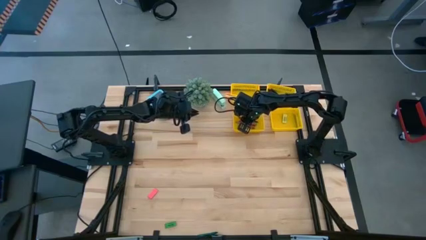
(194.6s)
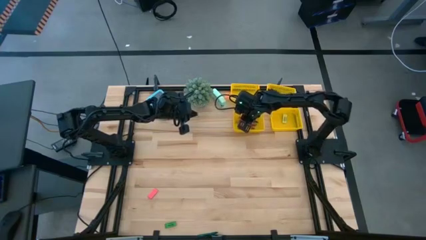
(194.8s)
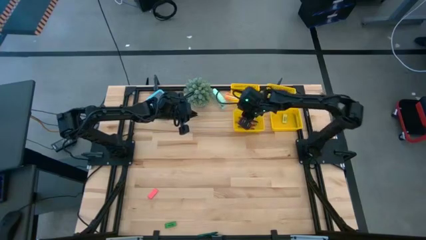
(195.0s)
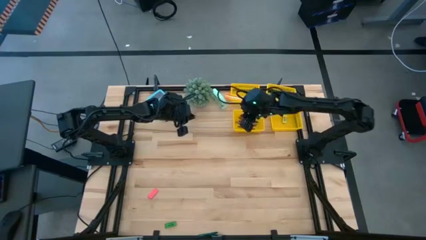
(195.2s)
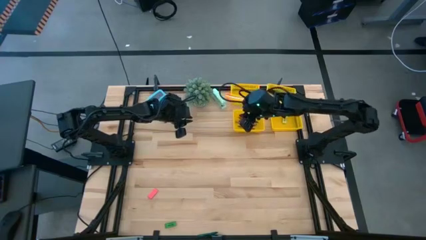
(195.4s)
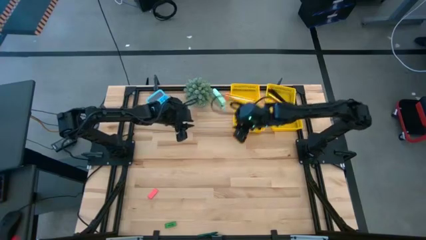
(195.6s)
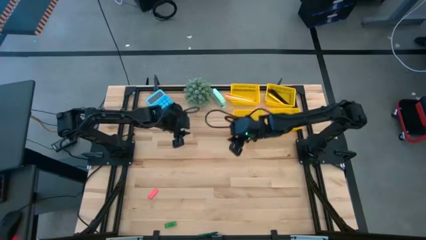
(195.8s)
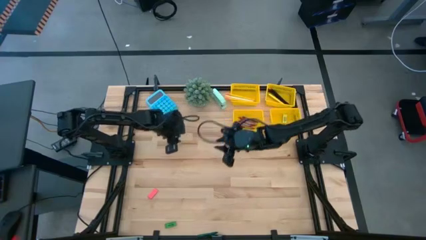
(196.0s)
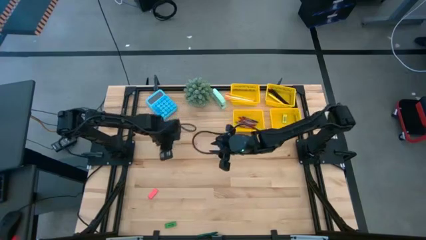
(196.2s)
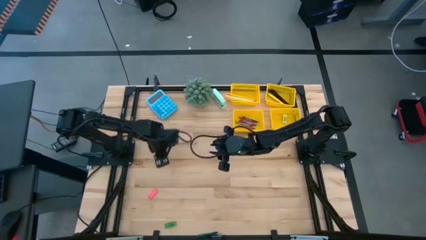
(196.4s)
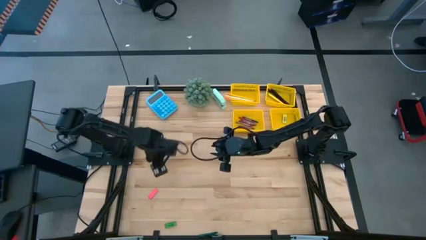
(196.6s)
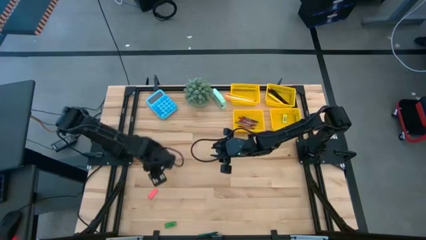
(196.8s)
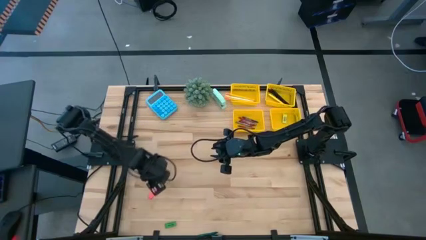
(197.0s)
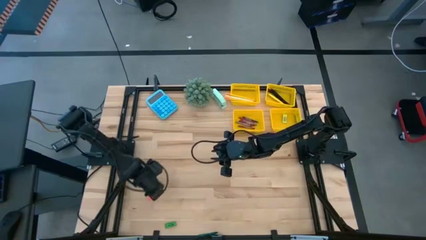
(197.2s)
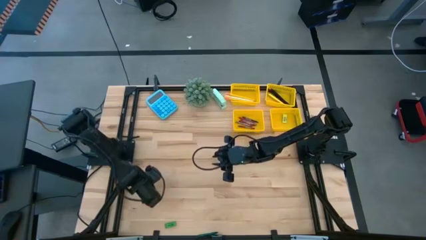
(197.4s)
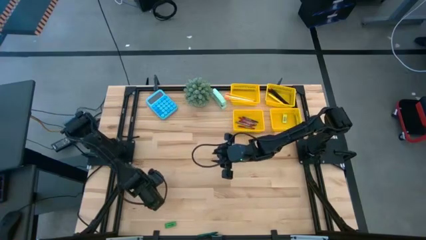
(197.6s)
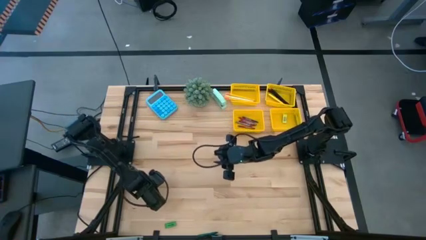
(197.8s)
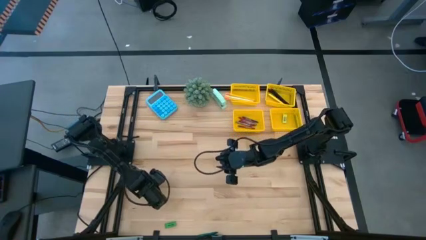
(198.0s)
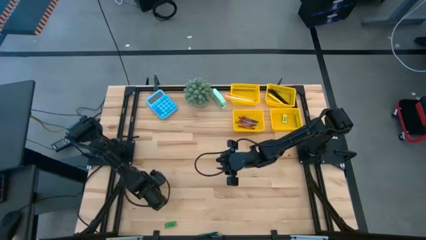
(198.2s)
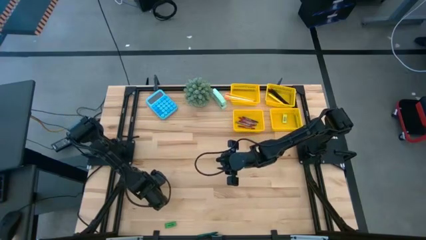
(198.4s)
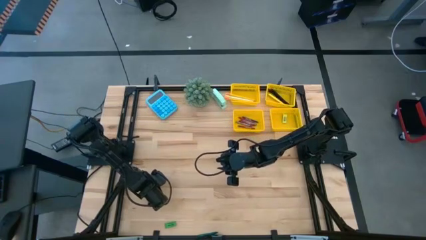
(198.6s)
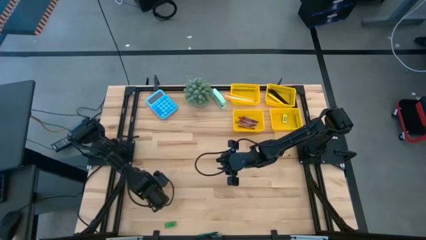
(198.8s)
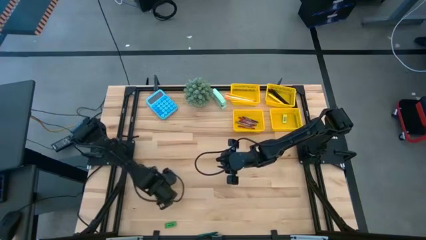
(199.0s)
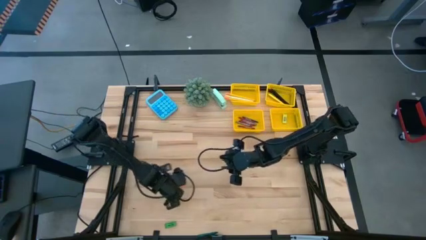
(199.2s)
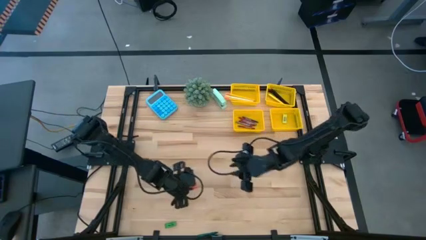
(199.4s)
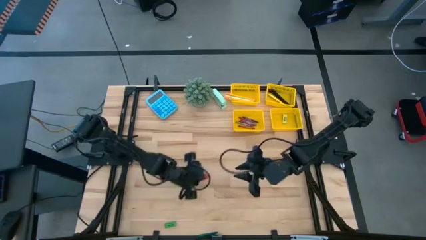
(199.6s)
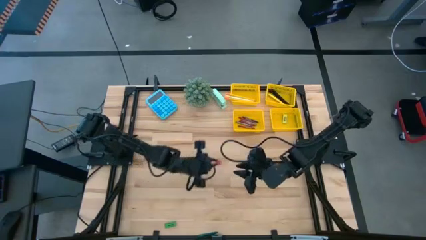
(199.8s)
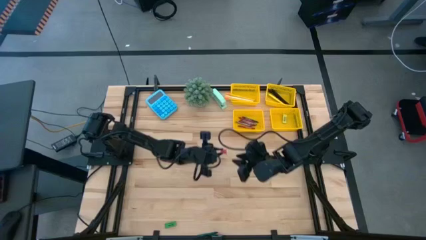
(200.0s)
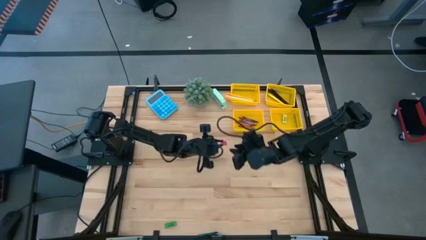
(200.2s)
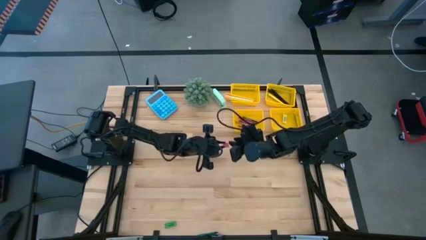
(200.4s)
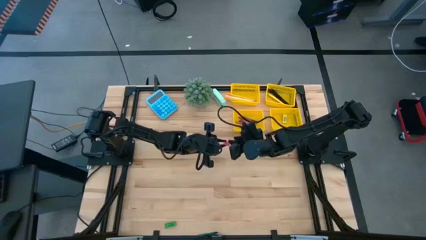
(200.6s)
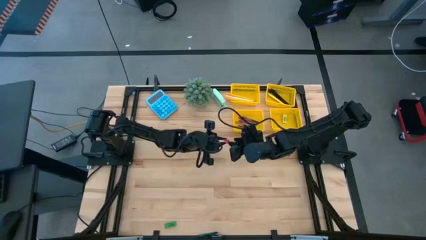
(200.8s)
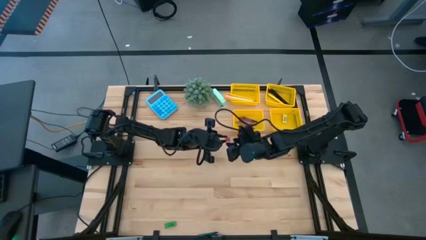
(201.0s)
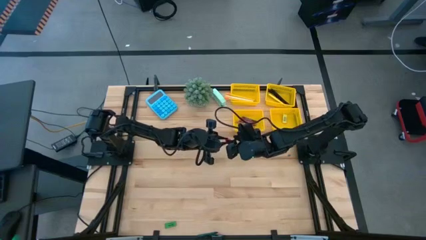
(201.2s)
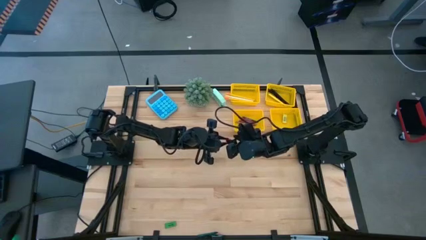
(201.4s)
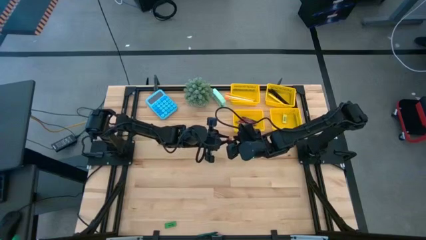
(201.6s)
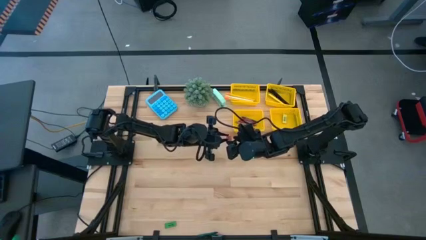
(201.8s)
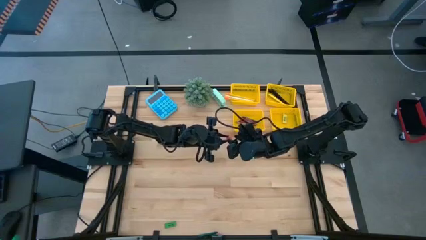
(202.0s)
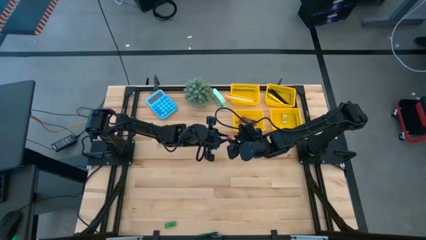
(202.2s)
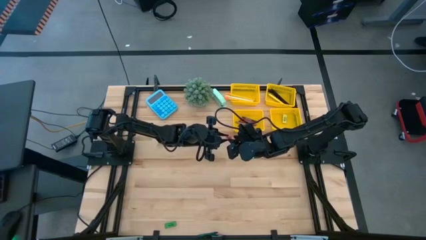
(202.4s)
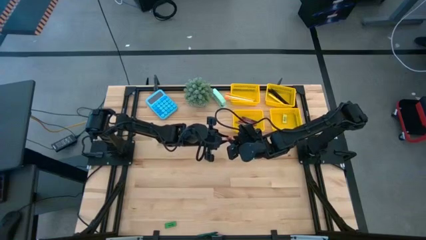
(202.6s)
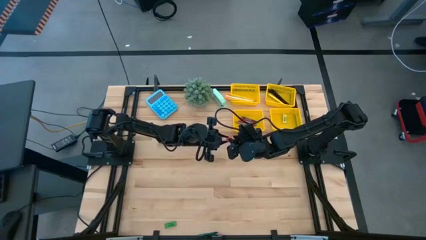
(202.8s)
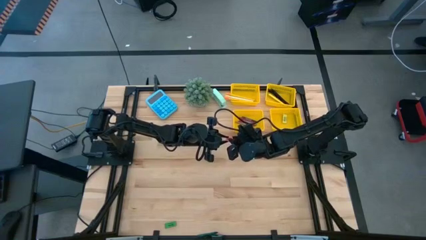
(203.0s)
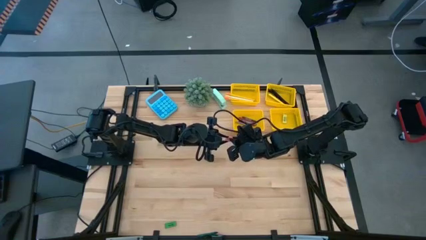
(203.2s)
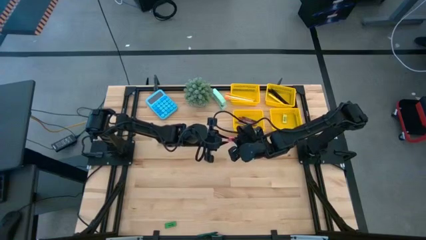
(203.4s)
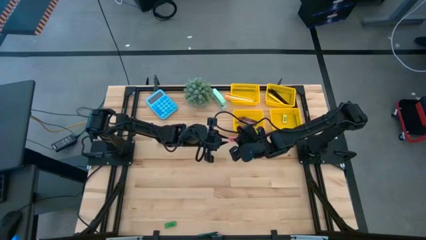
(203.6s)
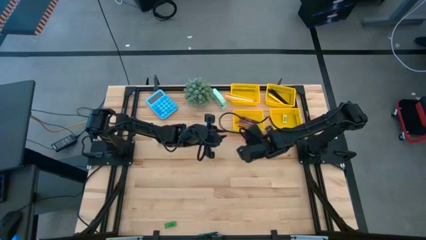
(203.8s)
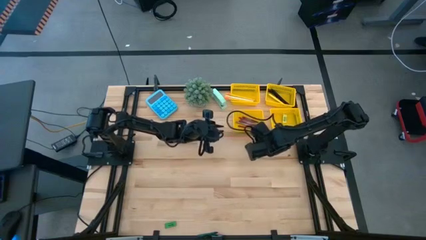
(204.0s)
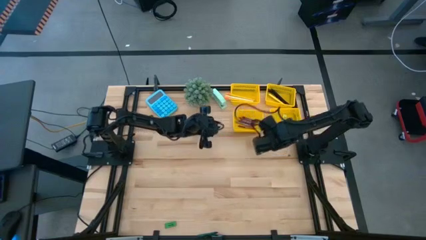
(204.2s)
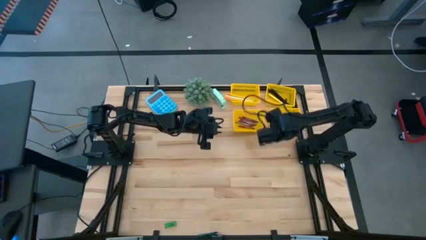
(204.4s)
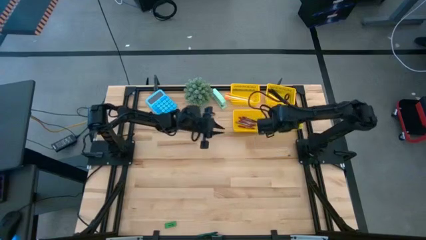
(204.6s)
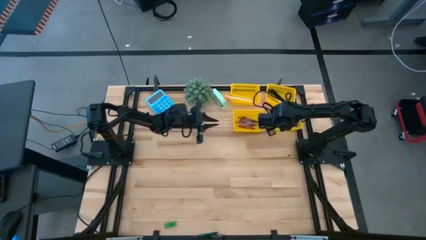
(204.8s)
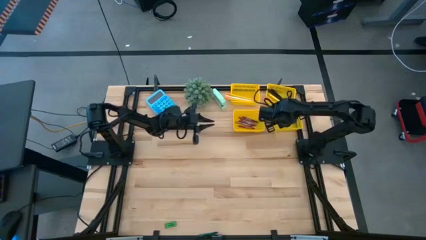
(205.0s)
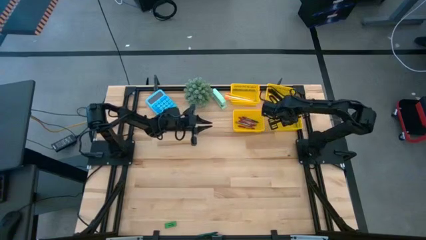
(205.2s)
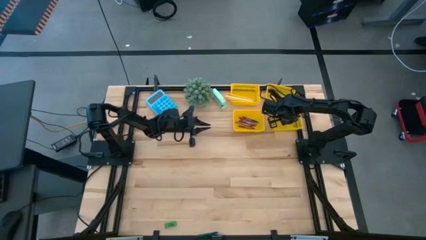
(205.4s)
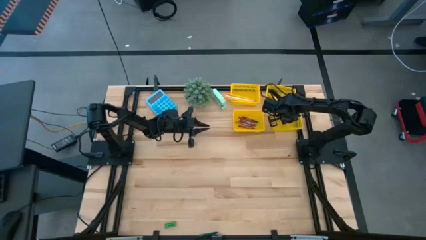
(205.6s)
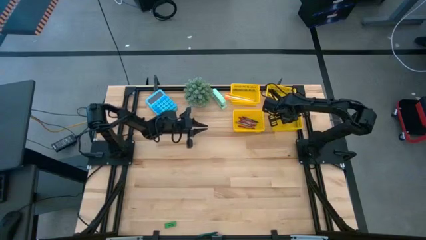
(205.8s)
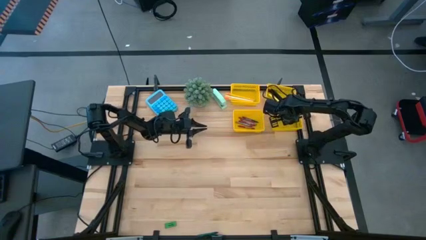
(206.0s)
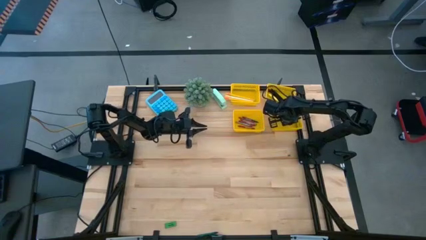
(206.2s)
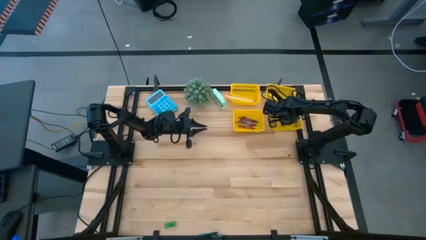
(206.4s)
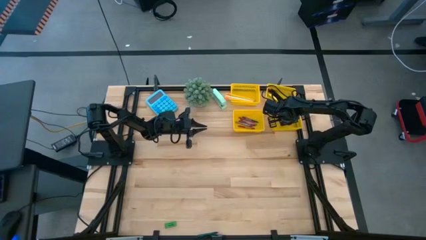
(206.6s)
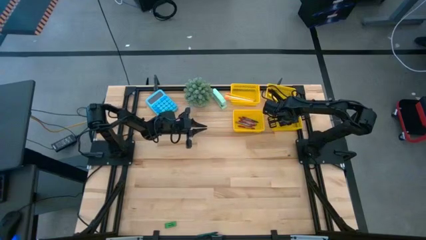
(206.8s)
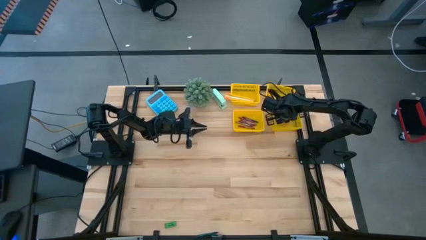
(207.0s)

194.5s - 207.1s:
Task: Sort crayons/erasers/pens/pencils in bins
Put the pink eraser into the bottom right yellow bin

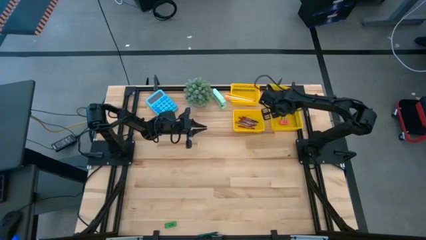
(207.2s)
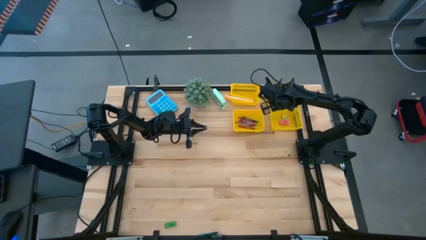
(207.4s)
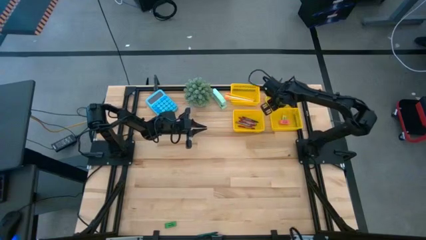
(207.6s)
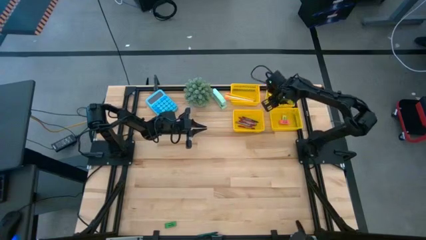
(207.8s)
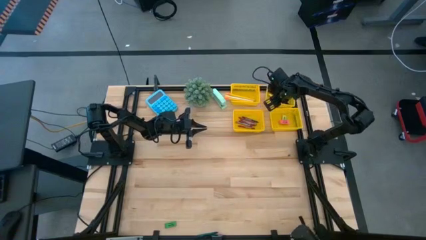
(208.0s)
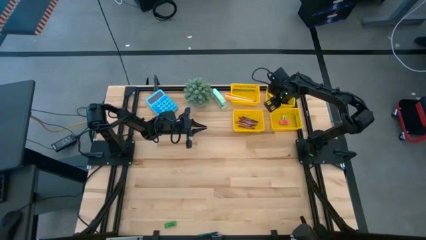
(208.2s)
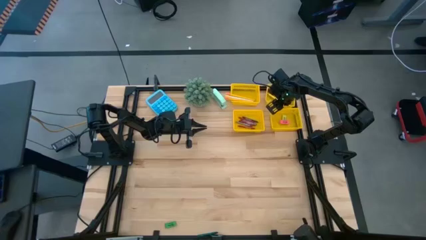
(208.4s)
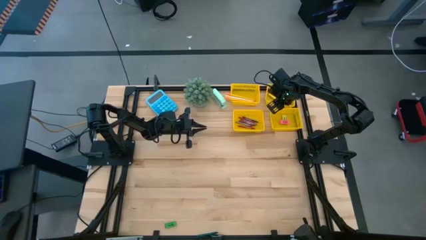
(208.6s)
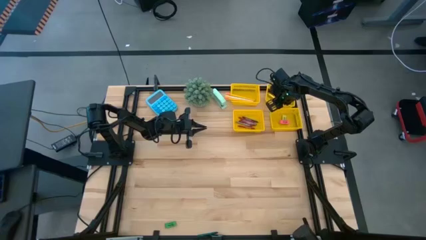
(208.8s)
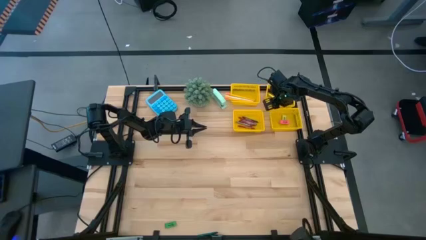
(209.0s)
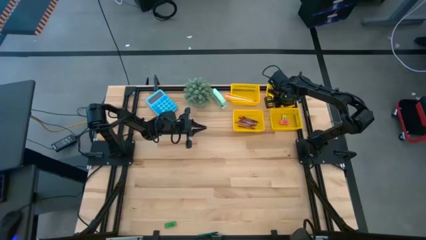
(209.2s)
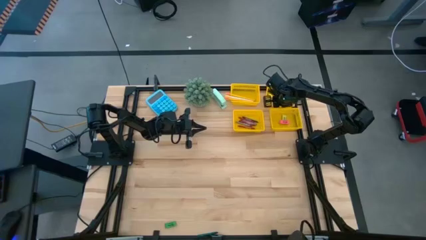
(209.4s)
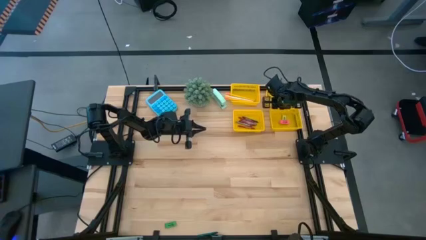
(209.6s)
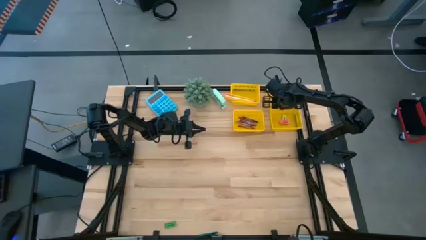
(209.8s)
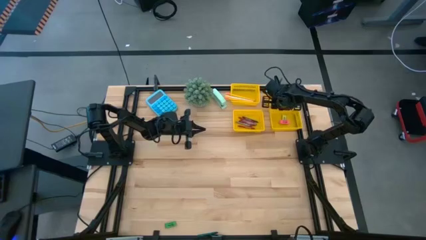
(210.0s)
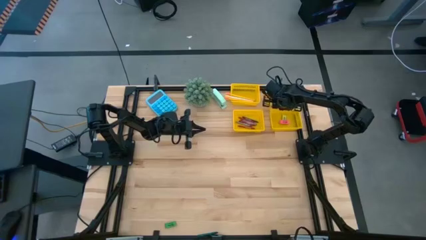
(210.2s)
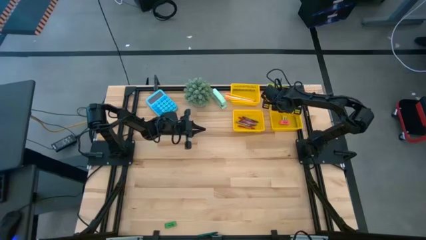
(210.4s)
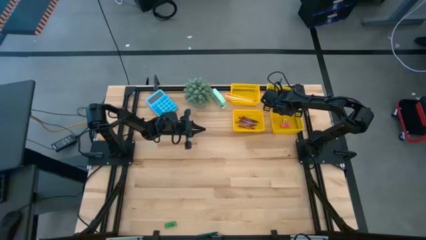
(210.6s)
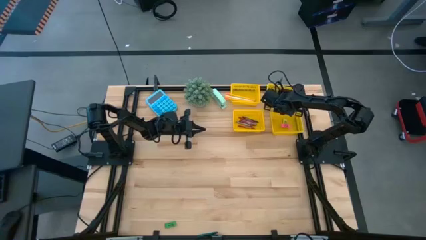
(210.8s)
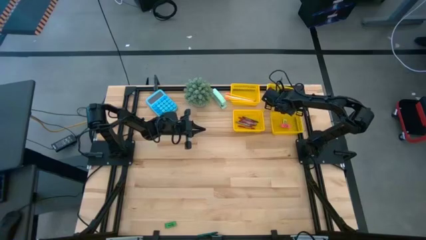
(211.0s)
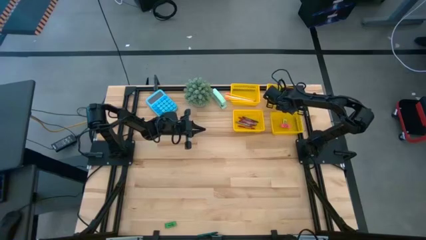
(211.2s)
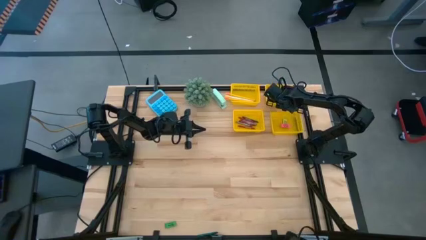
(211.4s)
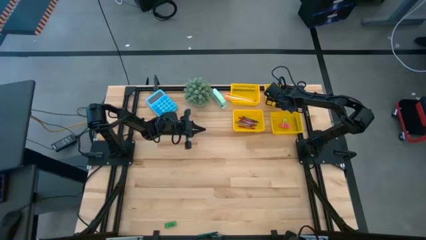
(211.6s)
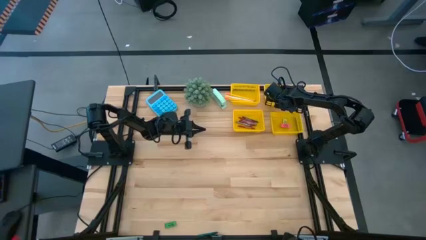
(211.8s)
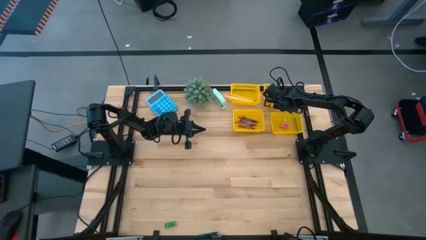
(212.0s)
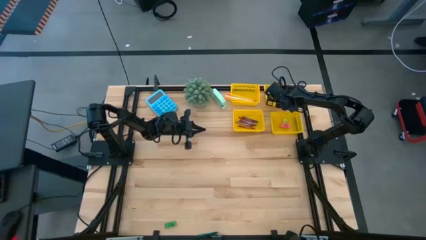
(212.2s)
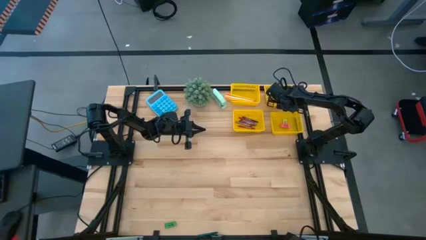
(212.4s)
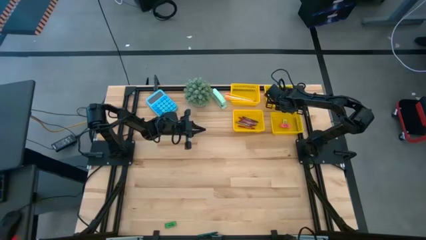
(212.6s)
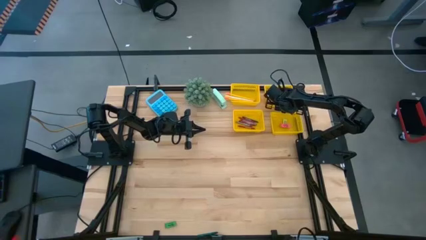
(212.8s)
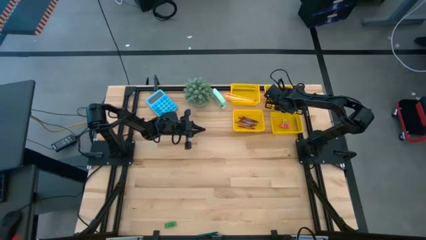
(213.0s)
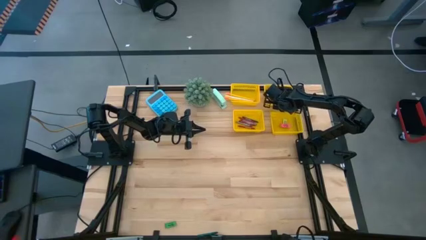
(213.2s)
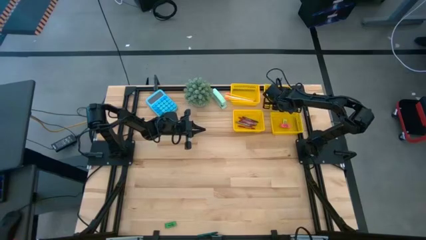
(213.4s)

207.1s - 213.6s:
Adjust top right yellow bin
